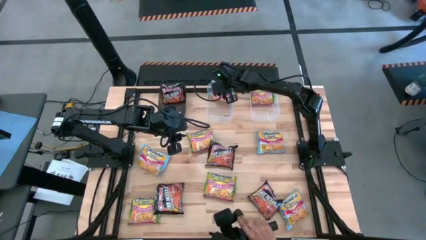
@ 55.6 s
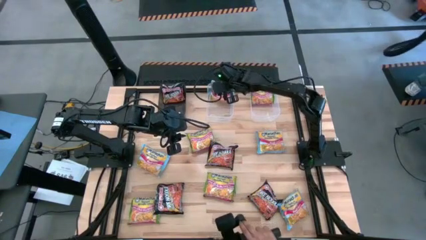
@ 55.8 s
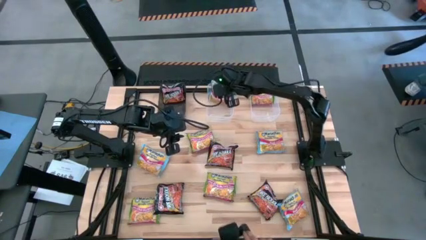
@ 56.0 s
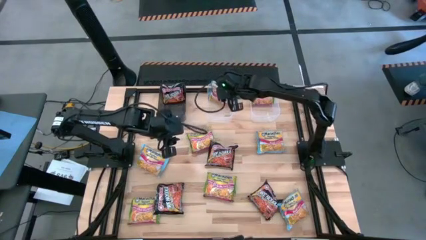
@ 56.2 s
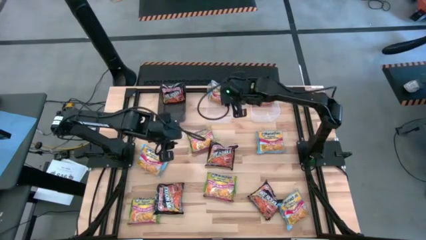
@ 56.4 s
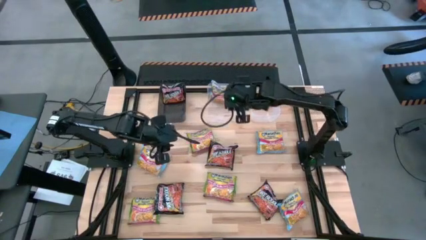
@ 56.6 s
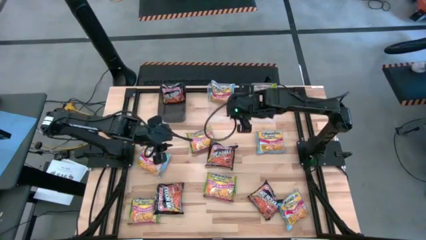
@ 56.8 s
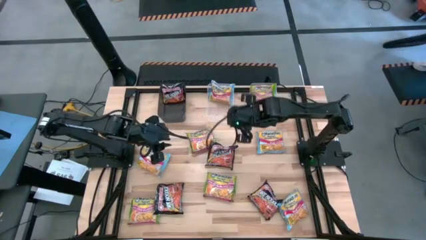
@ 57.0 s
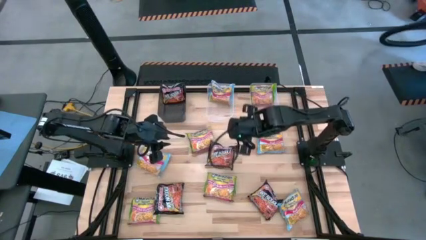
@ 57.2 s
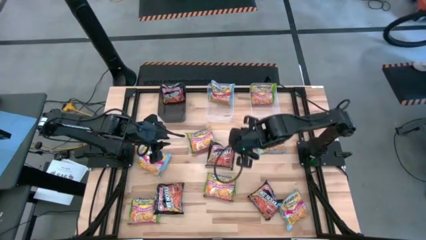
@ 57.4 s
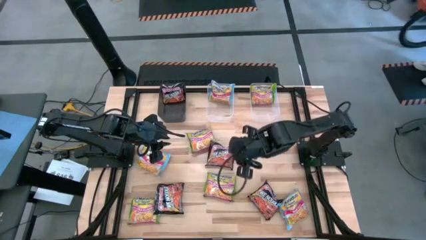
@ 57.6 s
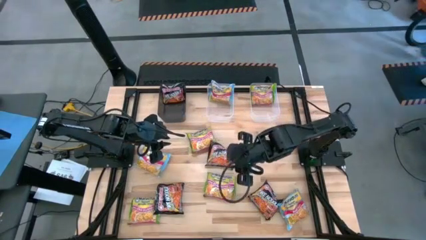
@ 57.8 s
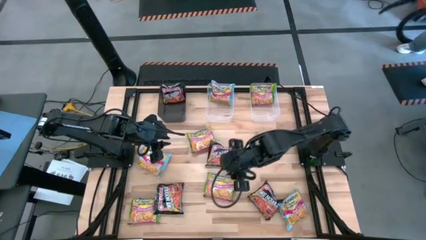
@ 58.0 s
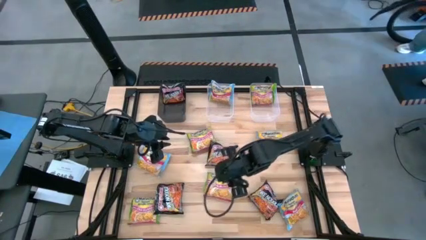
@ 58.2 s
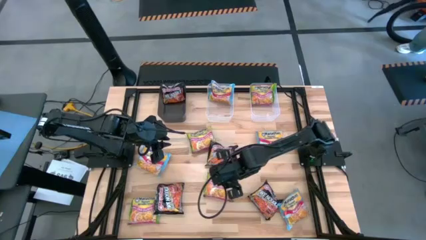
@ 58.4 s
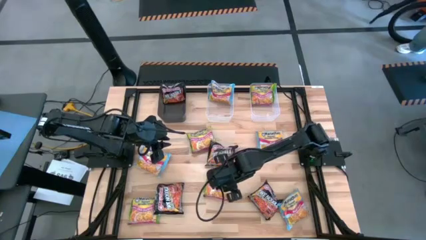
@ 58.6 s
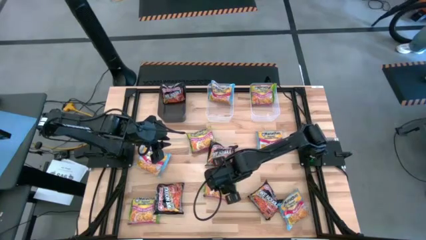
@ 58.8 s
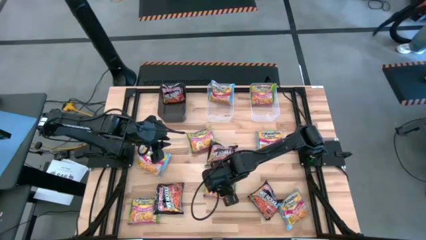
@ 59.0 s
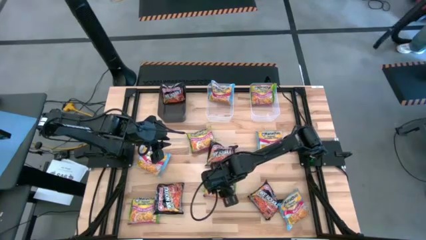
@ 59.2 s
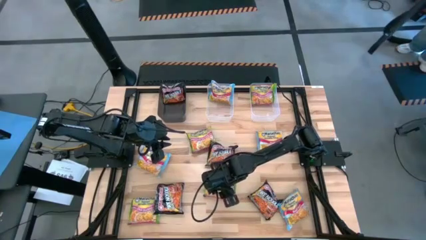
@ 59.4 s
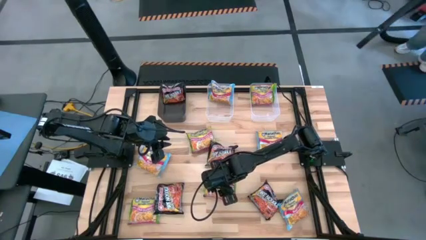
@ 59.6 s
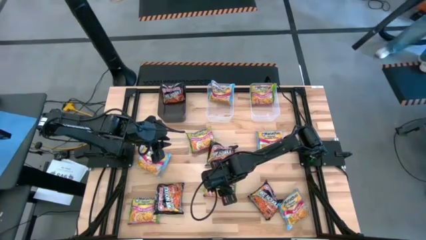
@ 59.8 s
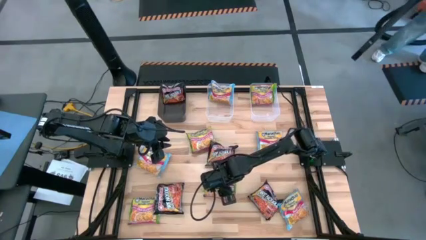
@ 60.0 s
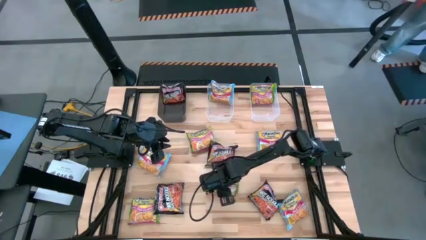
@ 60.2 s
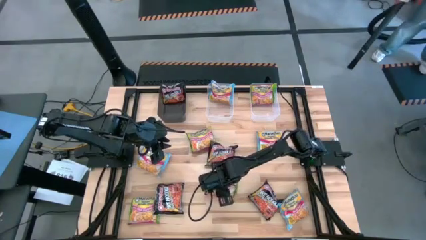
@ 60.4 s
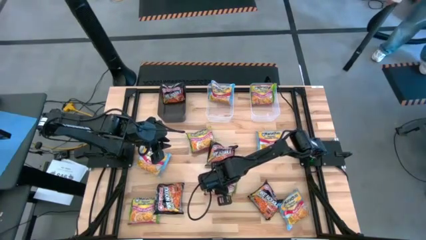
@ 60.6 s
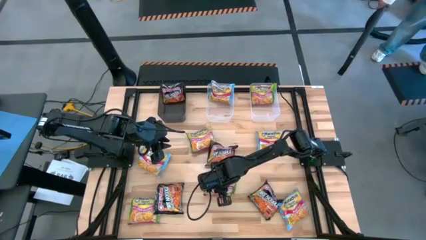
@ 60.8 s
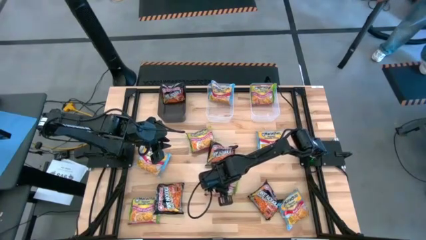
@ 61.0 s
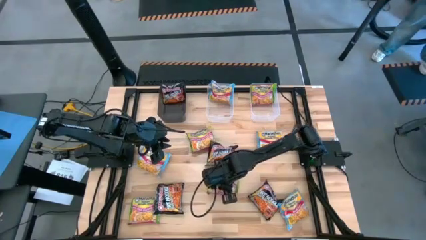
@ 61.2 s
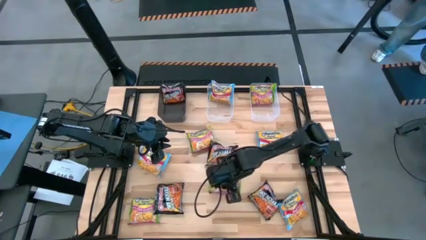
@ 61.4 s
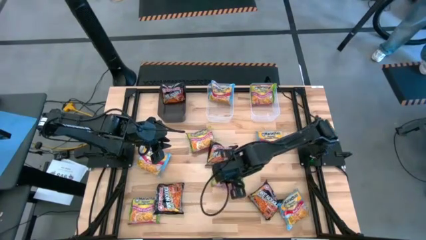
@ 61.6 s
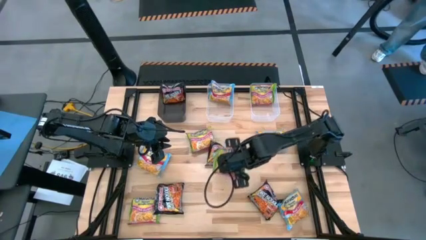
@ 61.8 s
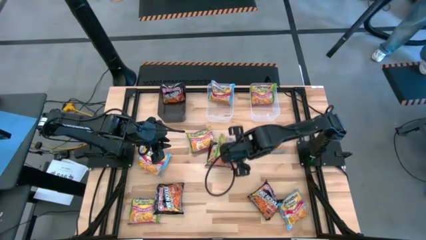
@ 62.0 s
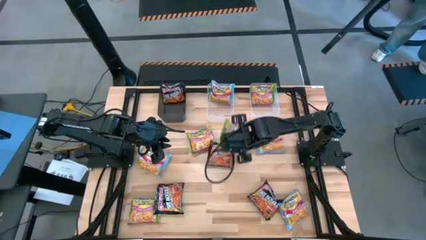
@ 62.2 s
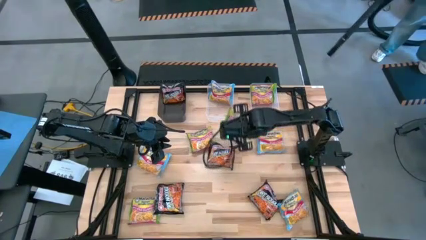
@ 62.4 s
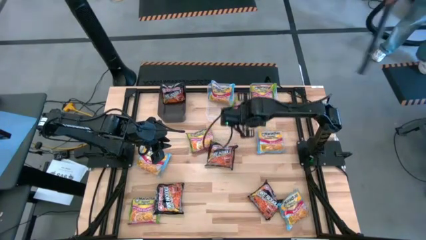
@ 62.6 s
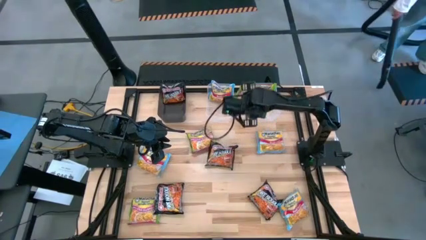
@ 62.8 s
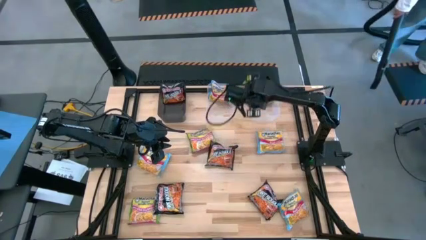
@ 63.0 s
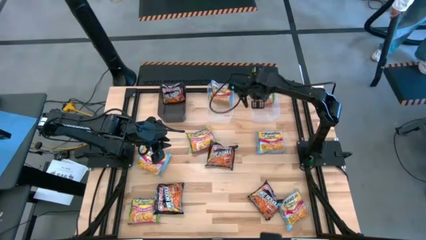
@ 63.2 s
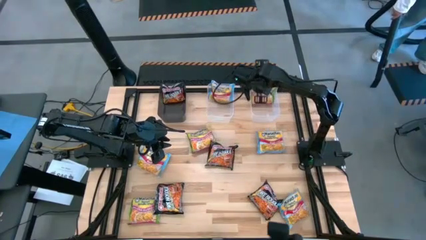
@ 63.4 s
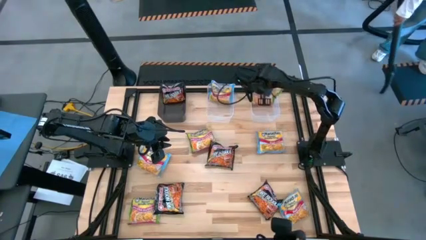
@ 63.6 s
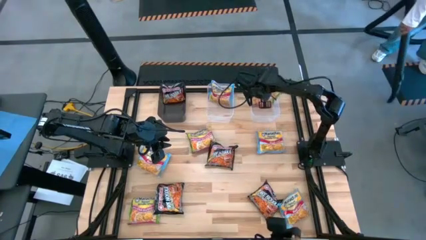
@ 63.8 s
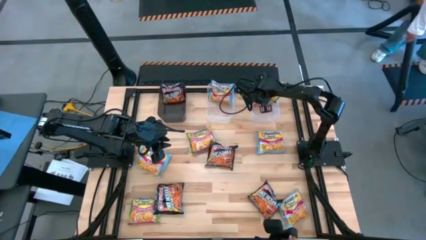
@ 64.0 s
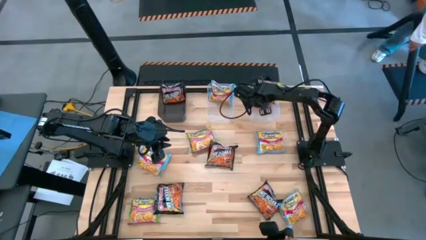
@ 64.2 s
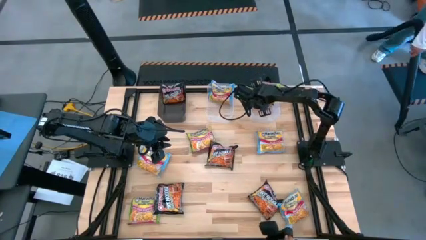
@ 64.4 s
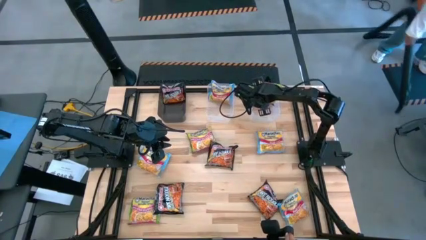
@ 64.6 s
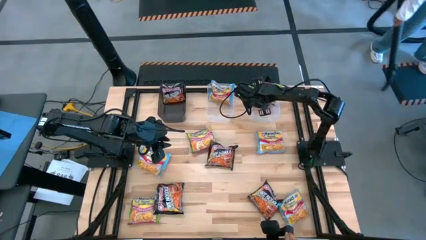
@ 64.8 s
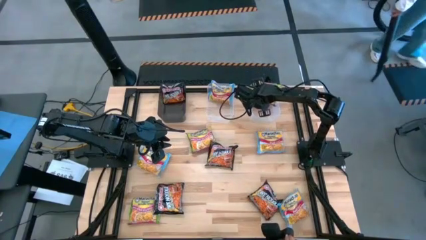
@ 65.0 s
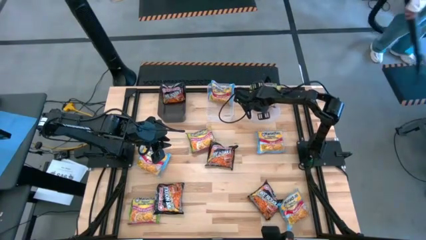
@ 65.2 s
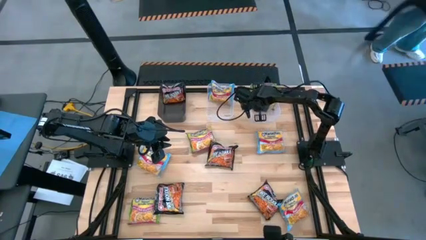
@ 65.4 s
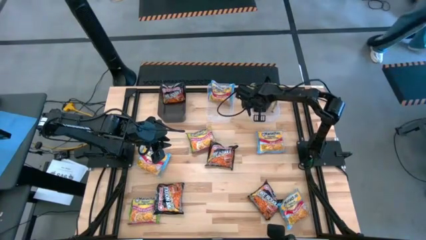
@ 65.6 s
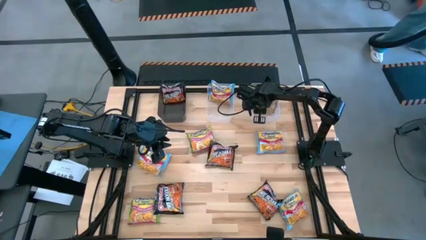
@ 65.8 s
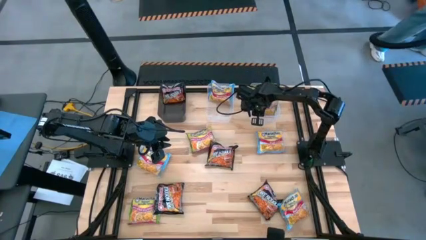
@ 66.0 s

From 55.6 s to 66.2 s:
Task: Sort Maruchan noodles
Put the bottom right green noodle pack into the right transparent bin

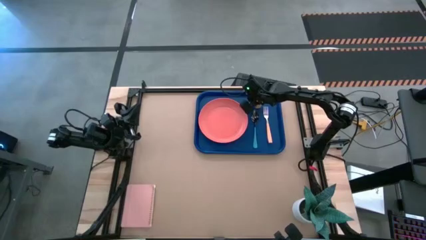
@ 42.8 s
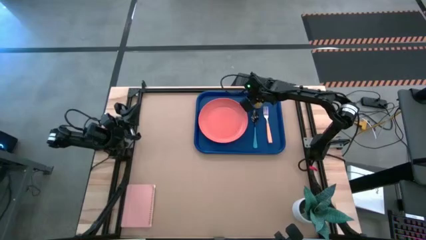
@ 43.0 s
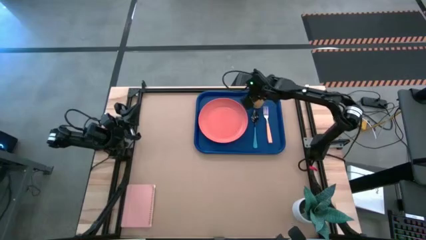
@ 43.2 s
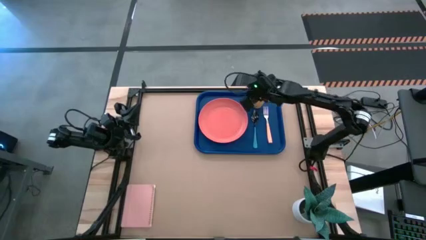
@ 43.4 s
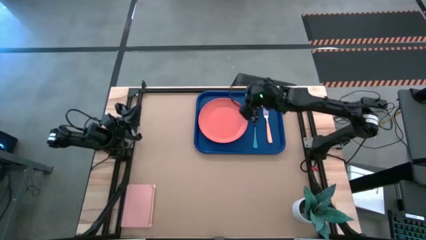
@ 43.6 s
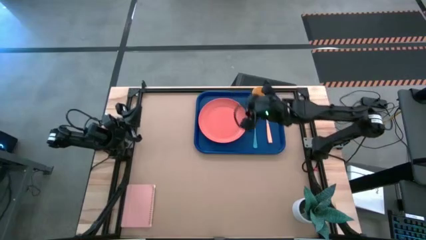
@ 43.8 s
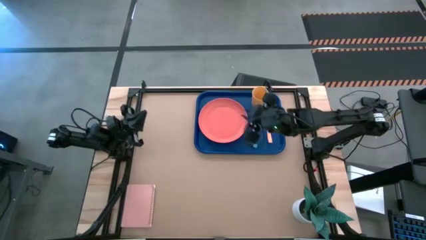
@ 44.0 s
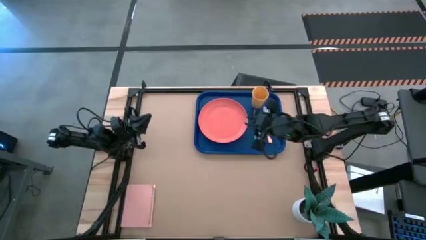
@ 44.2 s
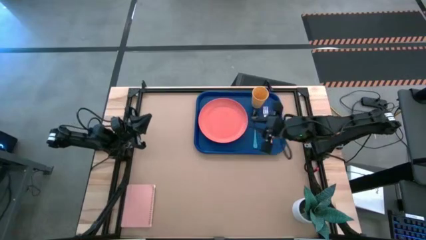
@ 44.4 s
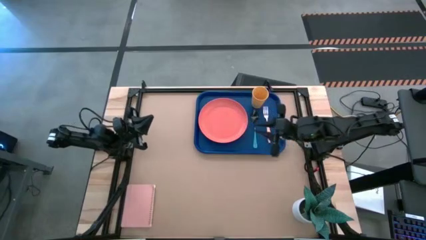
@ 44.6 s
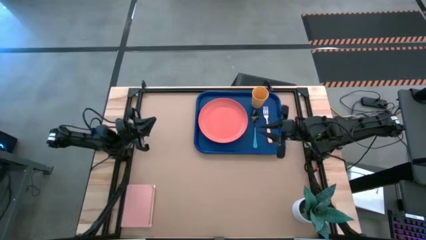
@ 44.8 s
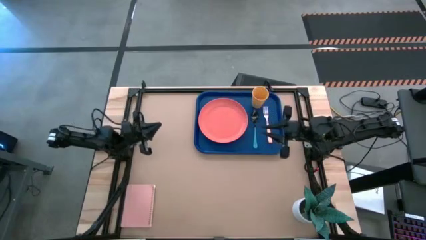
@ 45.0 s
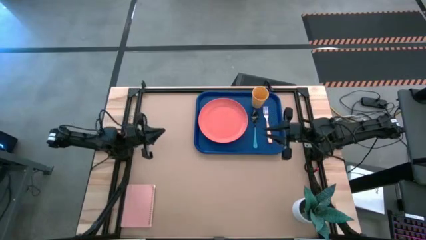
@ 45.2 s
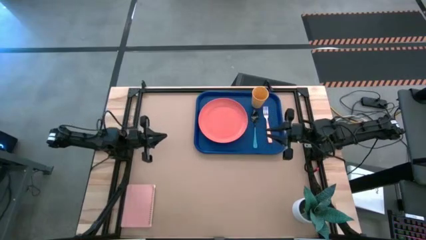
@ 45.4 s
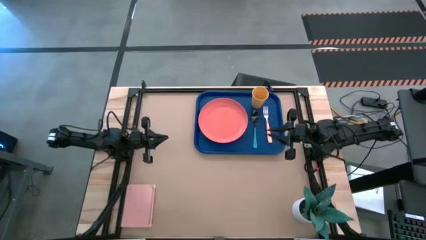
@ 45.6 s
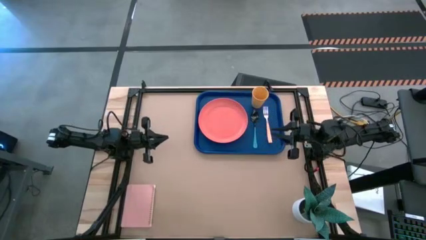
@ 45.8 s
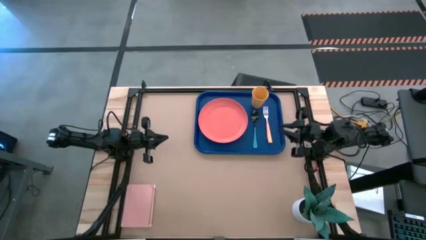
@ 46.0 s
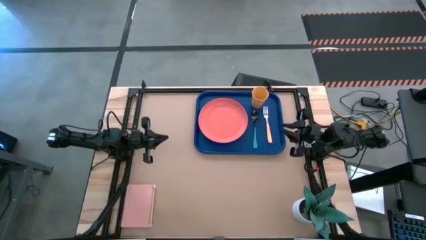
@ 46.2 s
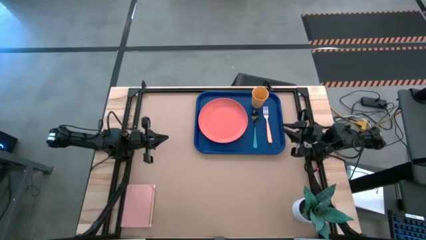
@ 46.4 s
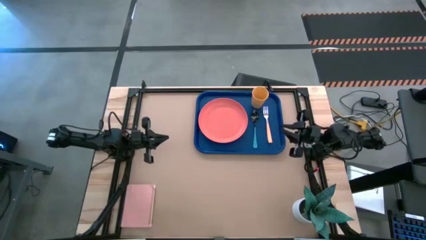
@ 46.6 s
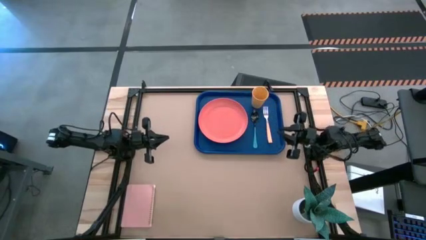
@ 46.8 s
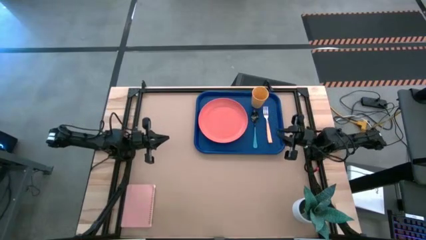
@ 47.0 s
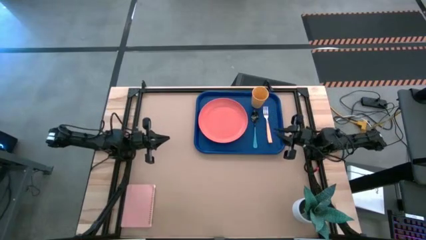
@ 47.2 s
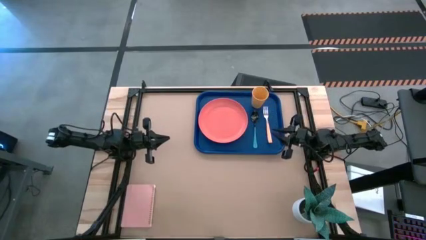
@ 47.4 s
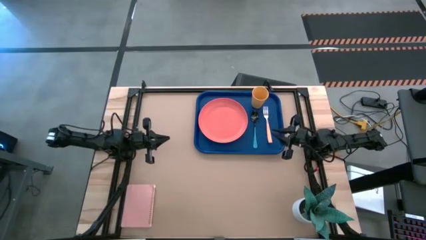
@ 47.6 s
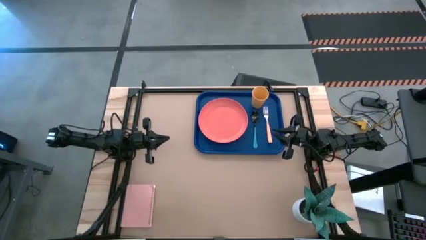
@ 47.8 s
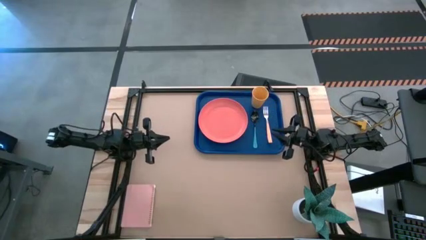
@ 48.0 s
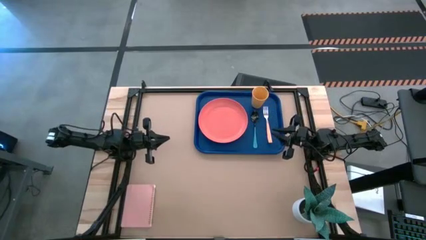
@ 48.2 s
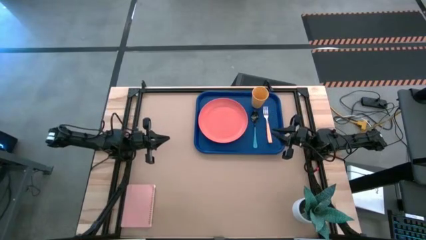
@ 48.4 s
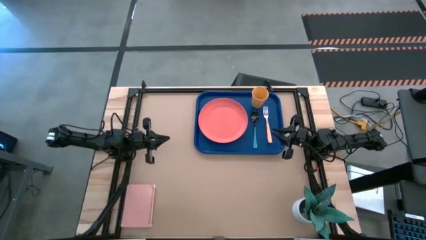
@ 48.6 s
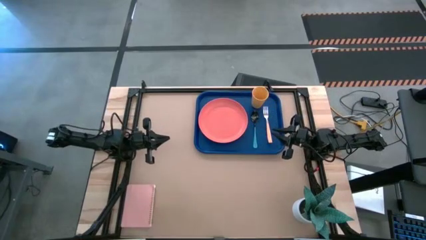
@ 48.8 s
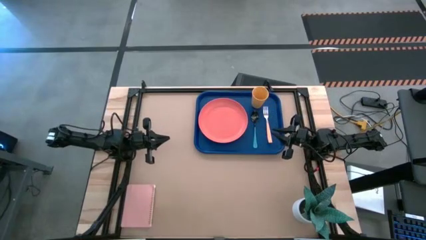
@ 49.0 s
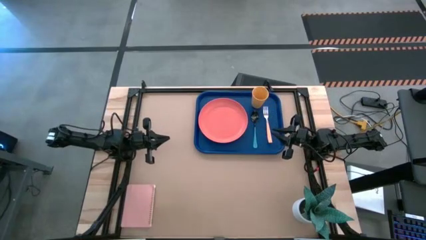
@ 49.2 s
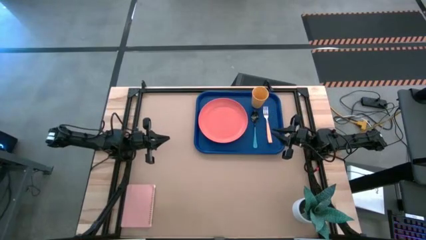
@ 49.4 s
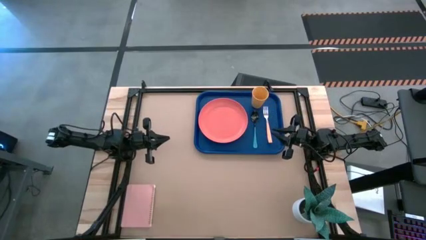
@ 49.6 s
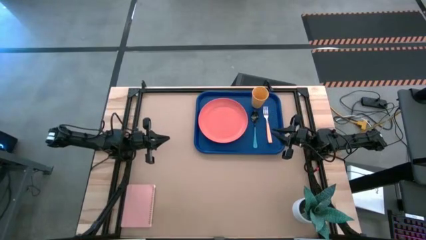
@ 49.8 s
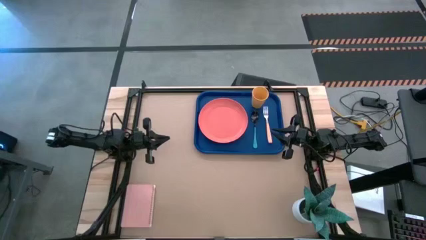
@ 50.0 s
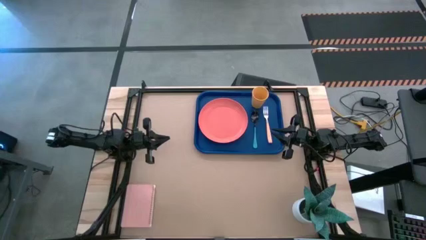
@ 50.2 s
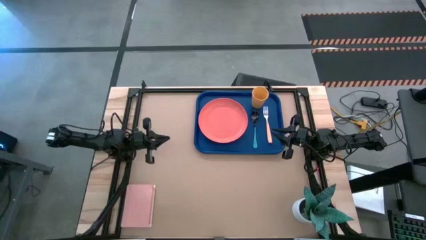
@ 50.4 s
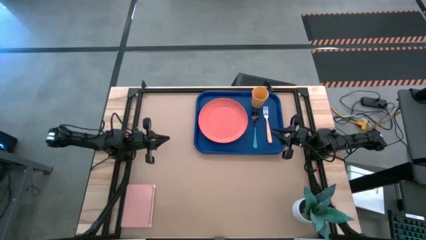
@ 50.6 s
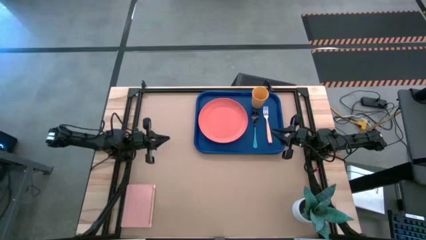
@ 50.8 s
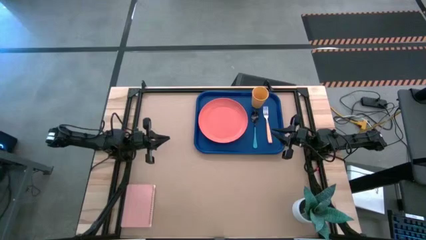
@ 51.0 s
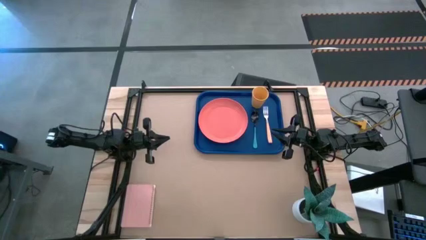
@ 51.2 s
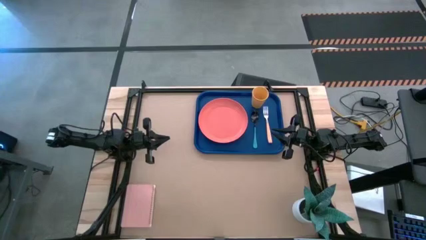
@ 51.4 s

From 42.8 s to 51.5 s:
Task: Pick and place plate/cup/fork/spoon on tray
Return to Home Position
